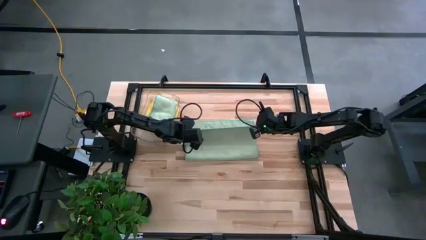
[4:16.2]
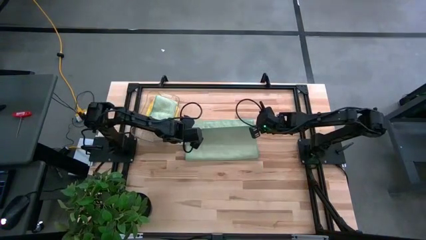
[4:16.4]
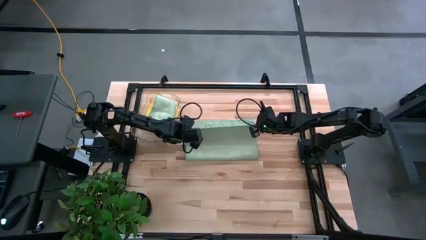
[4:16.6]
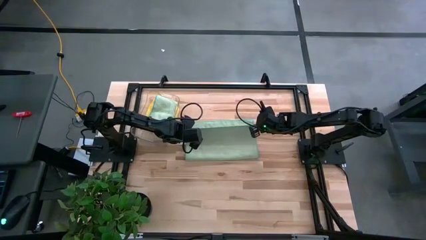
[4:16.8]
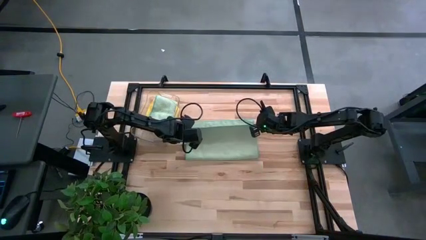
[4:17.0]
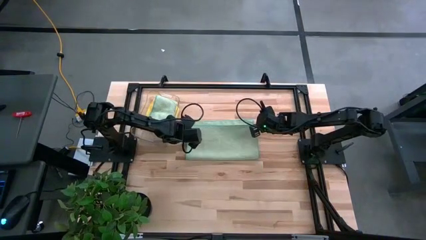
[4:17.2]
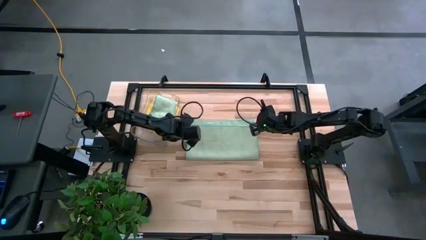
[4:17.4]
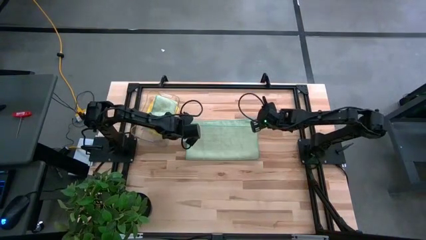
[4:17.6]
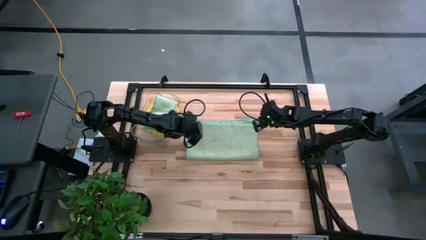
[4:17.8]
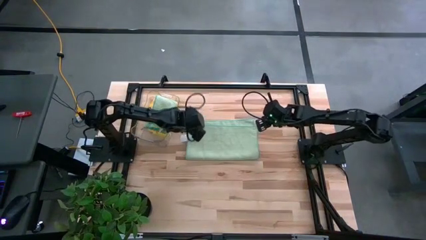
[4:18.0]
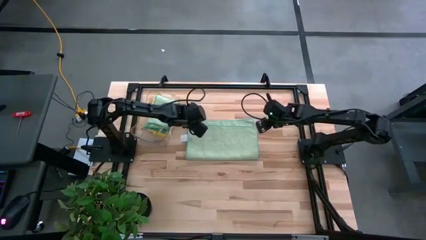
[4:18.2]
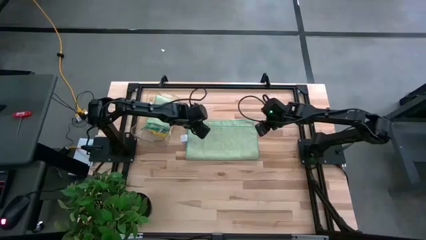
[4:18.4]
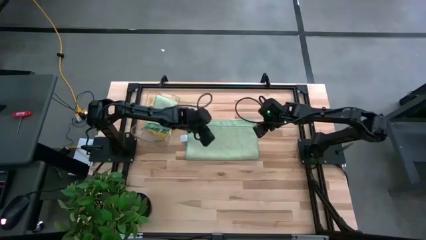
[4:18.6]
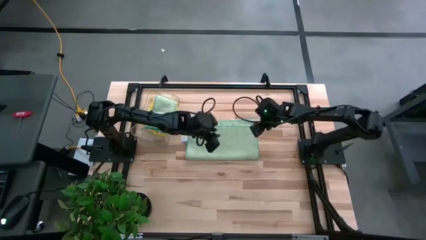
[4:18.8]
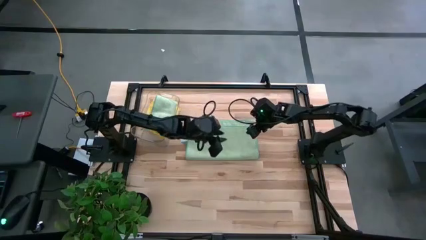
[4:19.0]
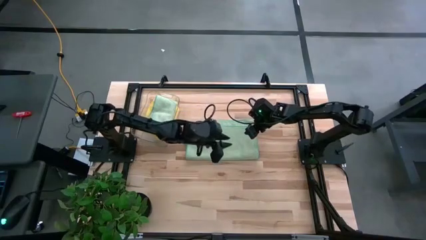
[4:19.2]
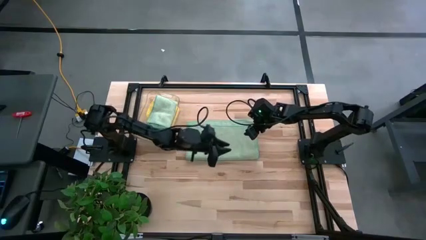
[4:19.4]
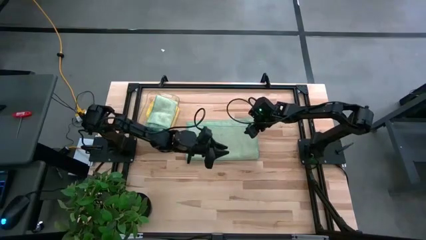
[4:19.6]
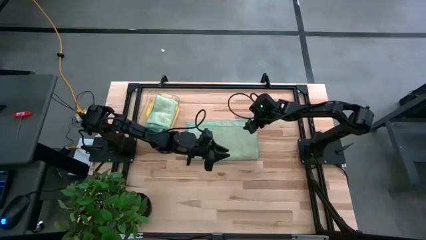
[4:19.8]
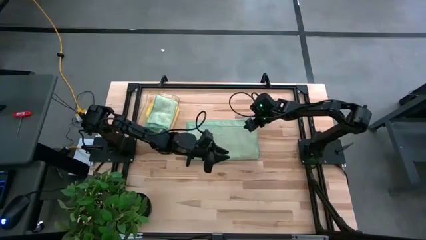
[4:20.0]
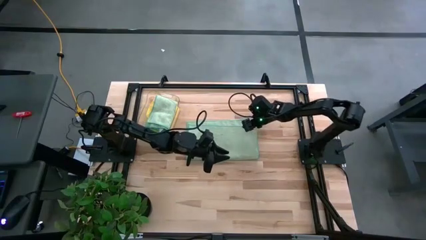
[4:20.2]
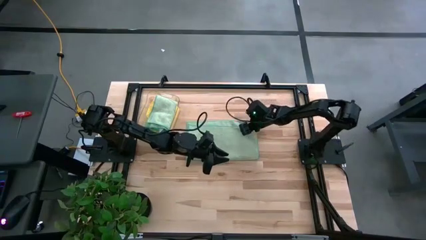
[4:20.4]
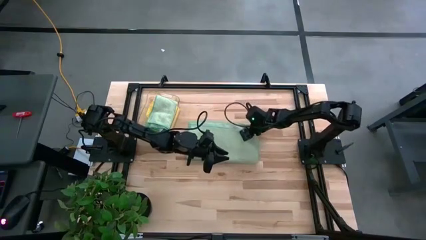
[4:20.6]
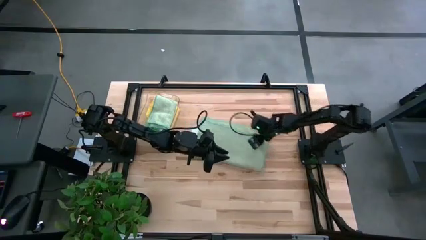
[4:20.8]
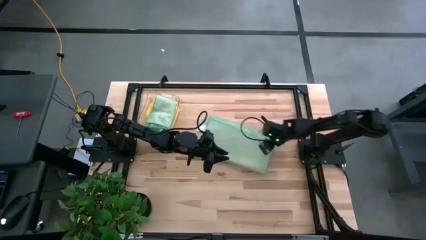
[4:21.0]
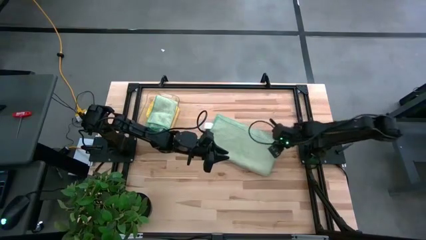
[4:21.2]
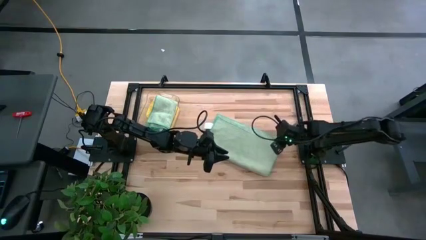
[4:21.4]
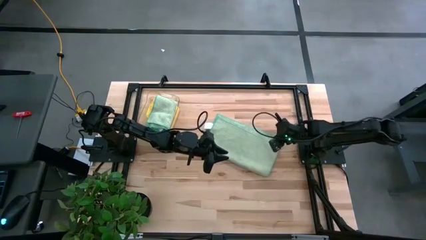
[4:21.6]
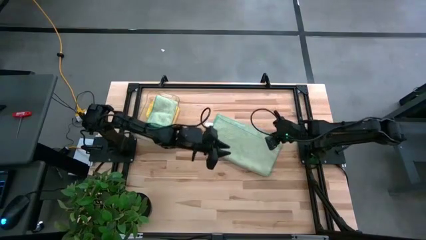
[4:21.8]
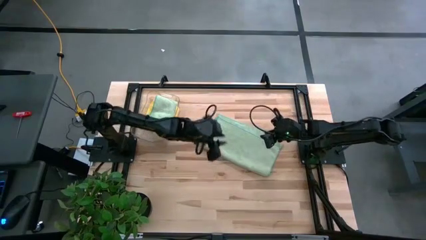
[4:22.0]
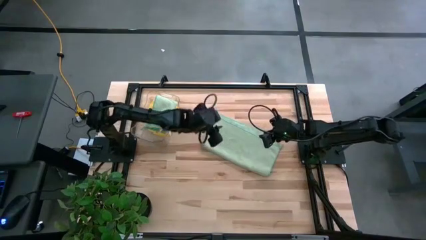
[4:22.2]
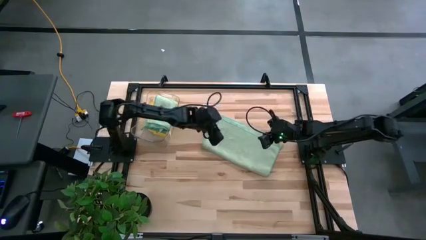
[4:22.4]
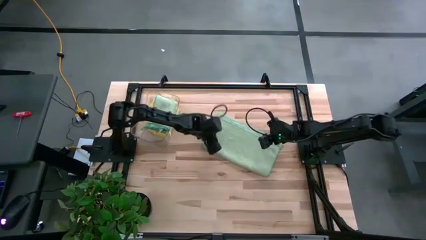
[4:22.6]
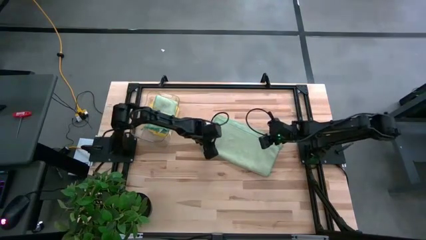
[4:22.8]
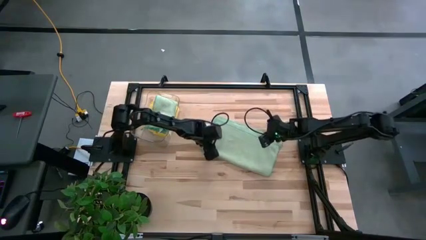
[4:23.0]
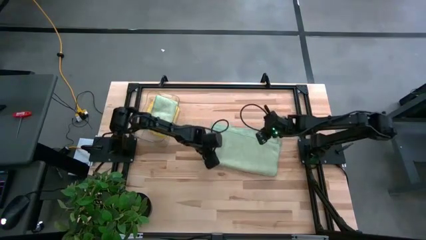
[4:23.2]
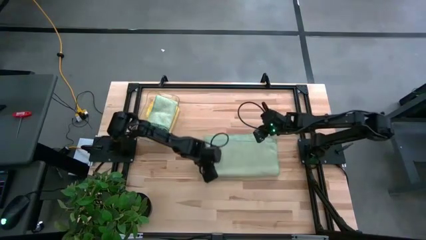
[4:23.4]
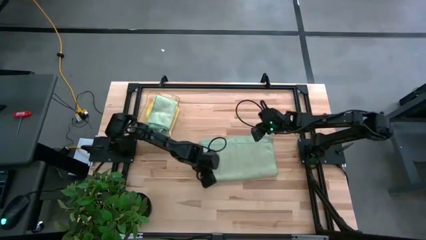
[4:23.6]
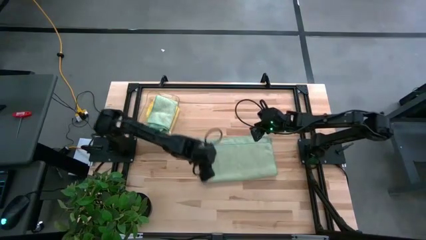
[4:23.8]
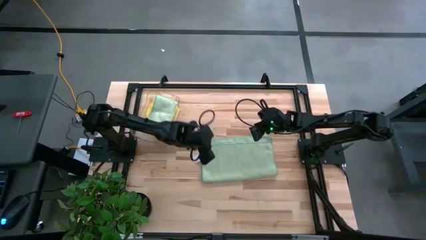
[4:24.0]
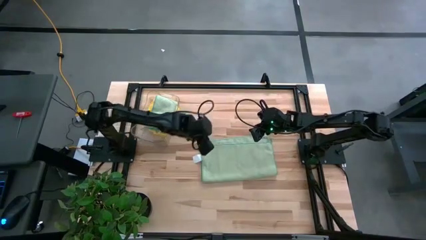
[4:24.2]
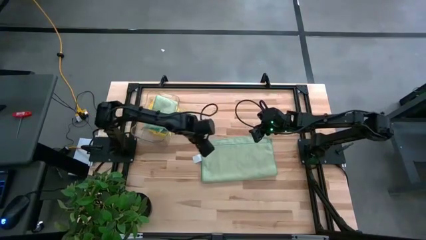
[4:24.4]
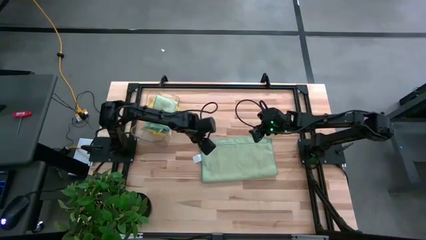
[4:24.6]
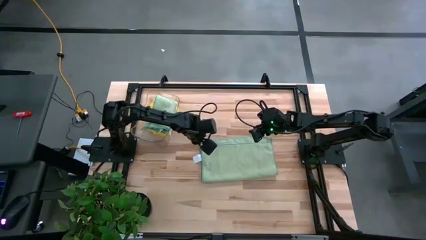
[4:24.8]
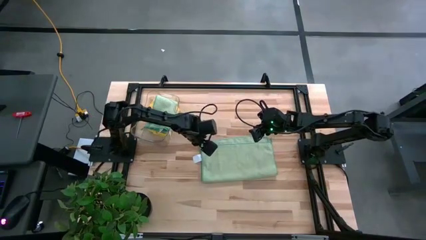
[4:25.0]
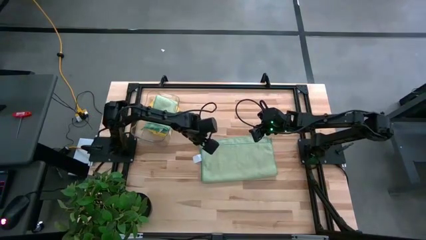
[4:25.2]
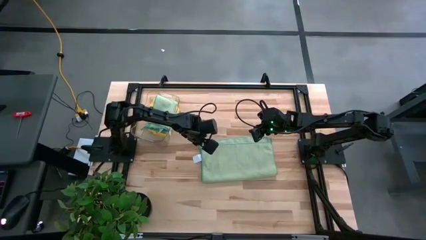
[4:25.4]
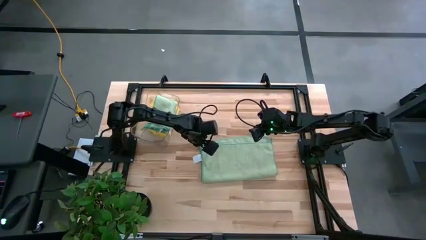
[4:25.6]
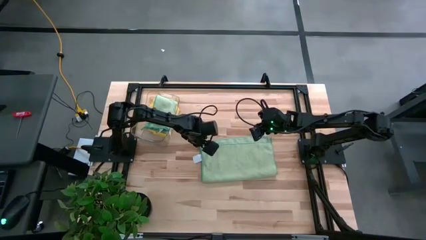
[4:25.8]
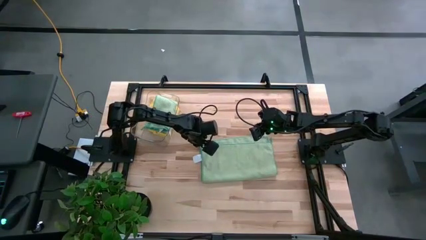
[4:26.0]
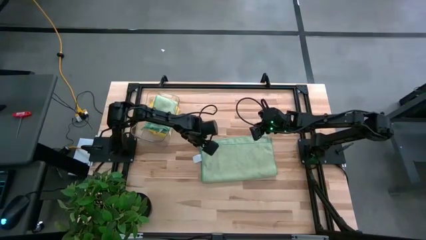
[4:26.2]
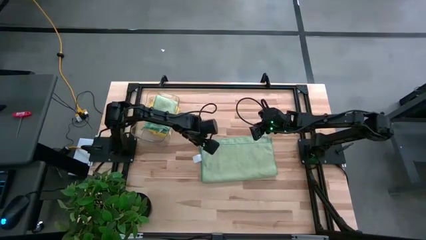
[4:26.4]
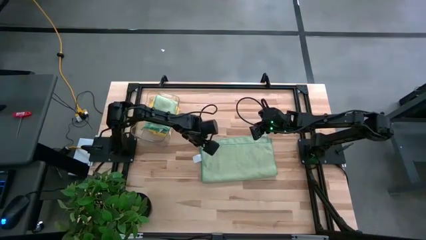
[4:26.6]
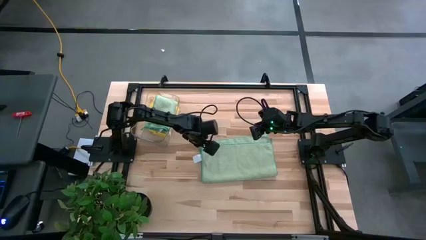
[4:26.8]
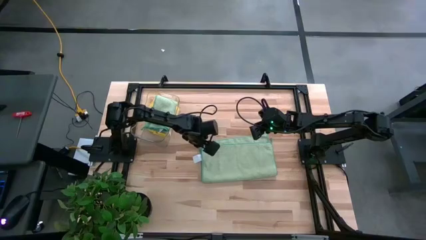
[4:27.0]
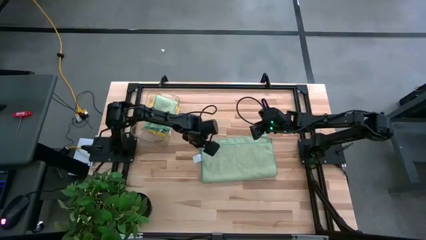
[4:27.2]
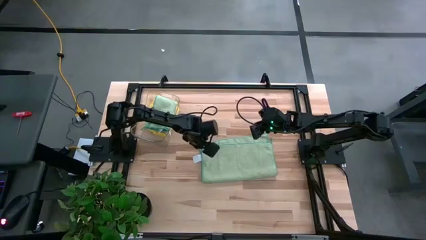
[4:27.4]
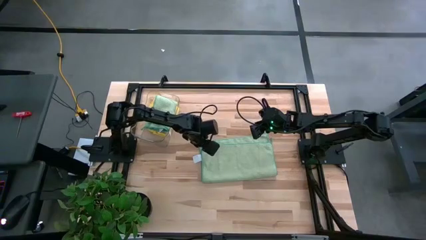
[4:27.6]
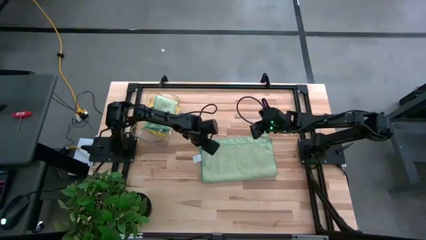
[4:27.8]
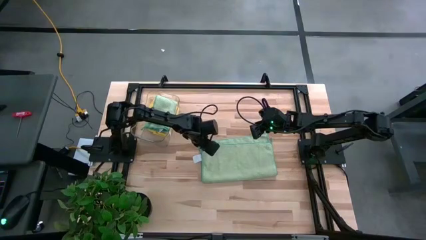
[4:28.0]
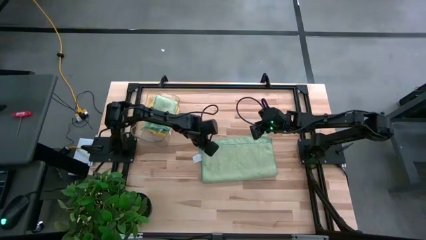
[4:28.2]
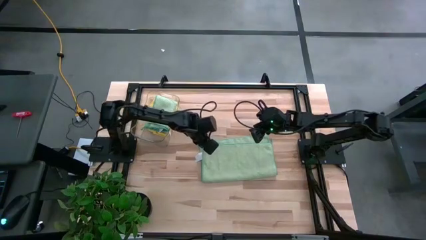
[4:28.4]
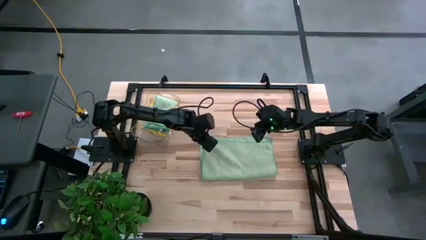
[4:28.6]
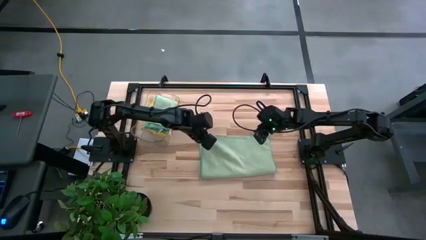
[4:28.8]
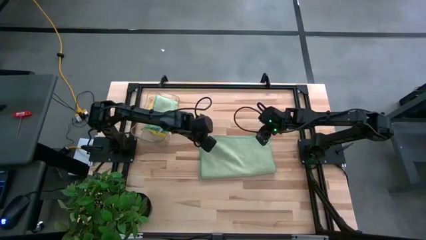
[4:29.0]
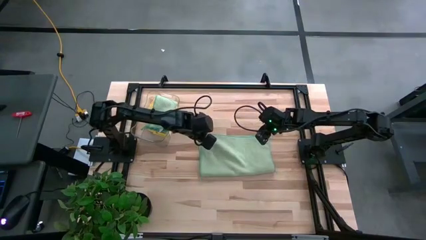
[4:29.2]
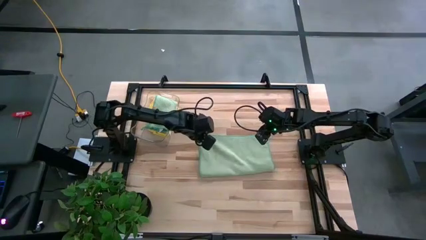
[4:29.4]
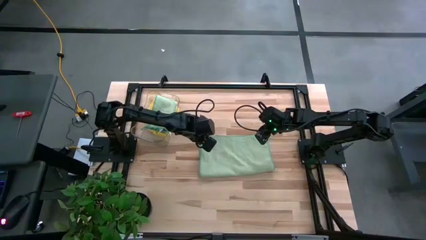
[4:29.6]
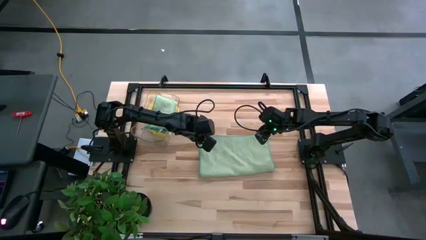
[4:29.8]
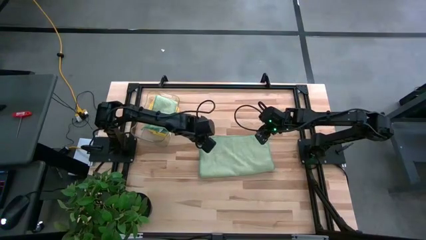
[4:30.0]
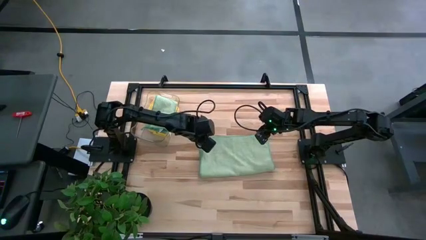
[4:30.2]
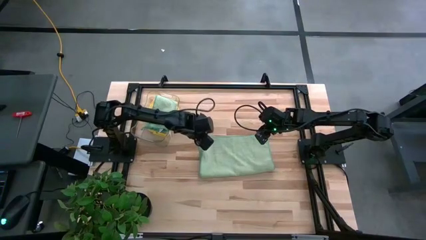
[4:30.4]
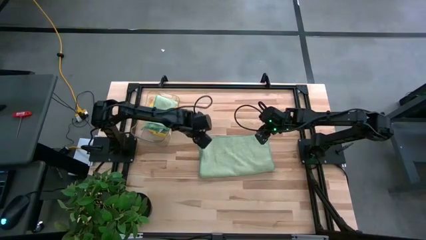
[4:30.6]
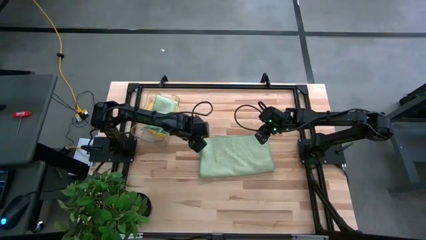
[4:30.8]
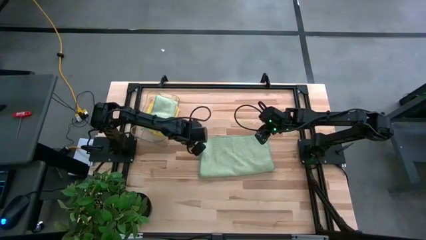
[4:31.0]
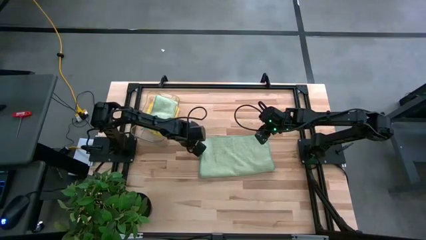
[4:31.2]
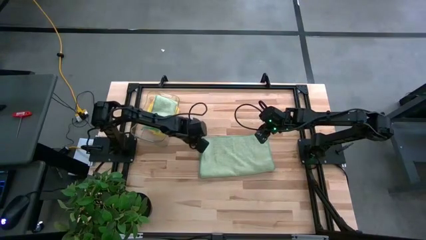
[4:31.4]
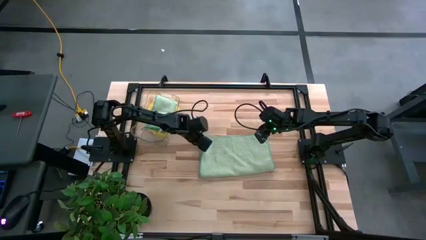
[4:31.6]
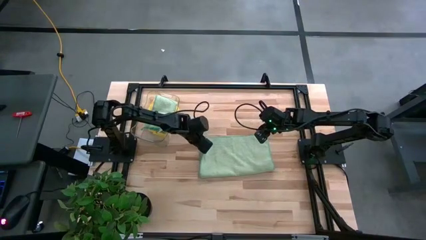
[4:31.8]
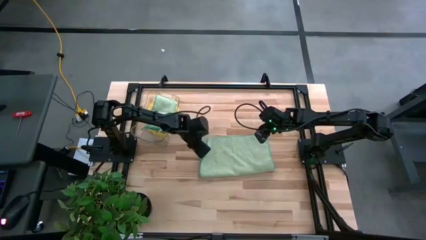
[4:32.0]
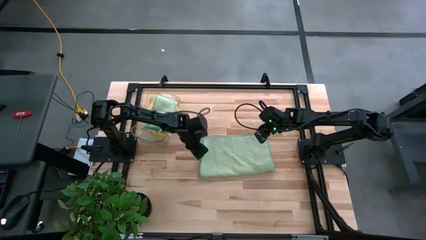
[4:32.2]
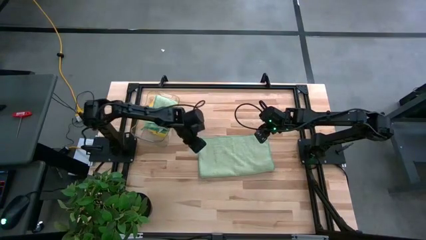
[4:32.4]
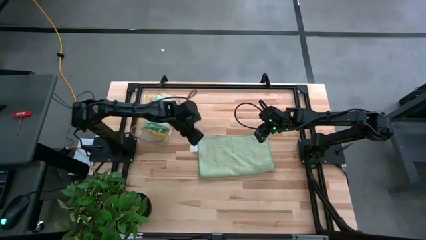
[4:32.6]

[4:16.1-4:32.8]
Task: Fold microfiber towels
Fold the green towel
